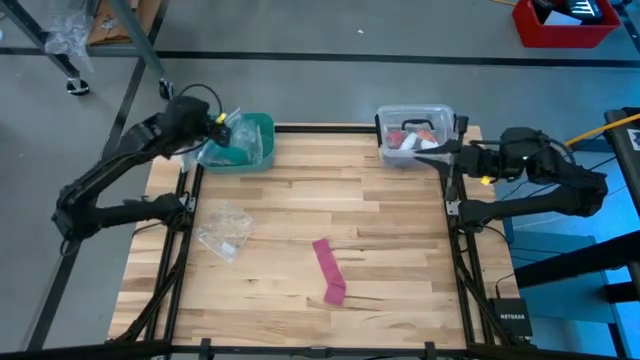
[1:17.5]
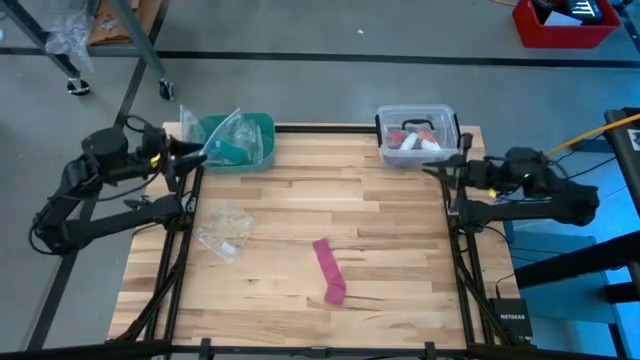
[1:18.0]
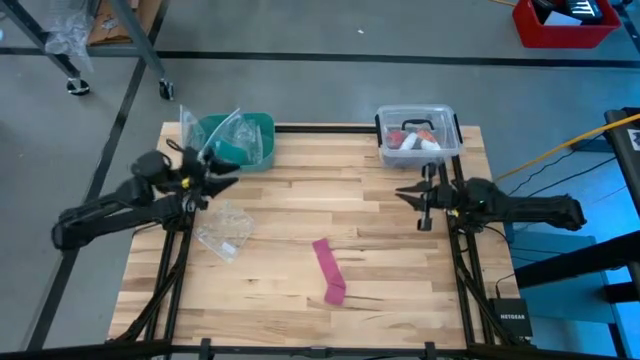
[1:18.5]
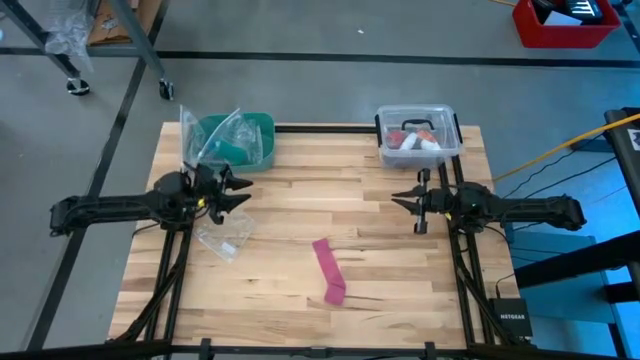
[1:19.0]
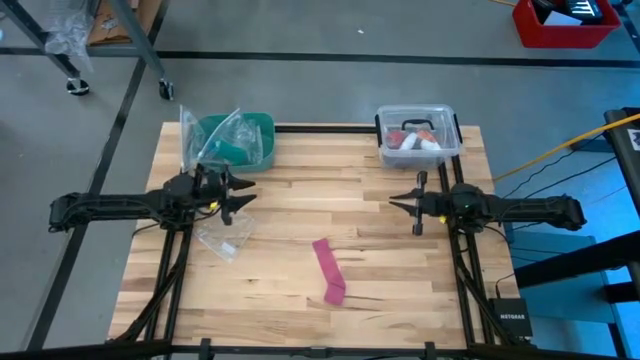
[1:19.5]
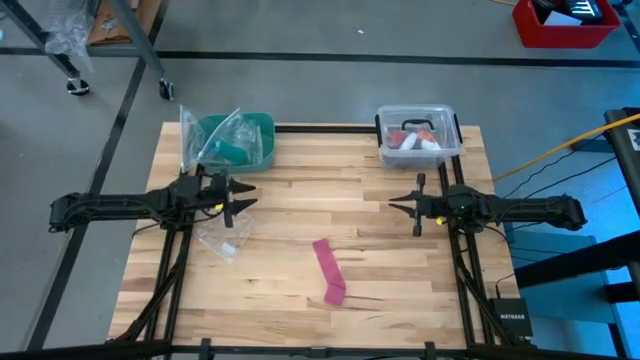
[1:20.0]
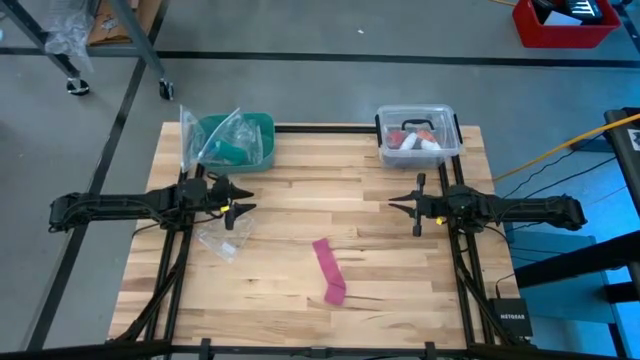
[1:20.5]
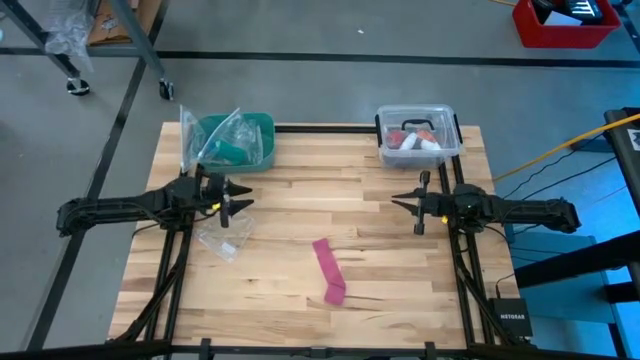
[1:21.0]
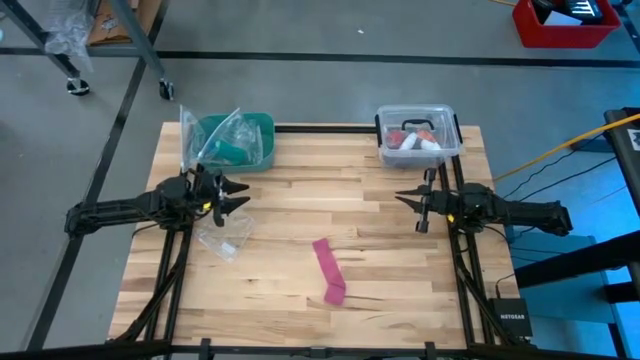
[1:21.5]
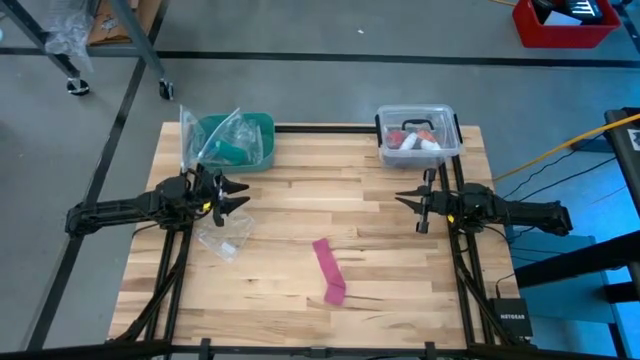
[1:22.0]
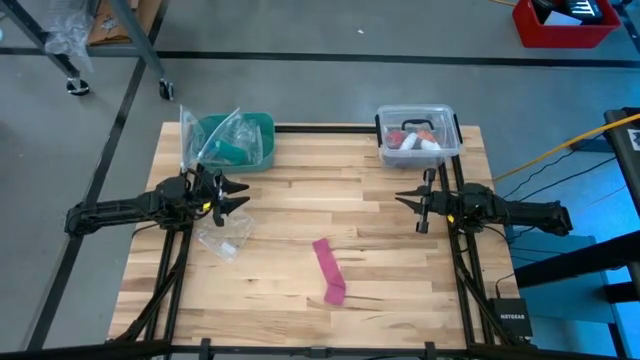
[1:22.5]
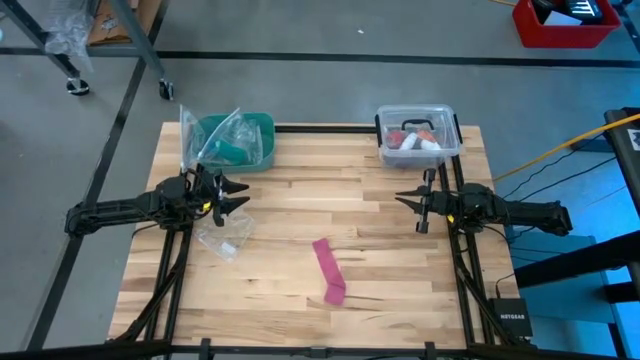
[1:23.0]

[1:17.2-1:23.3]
Task: Roll bandage
Return to Home Position

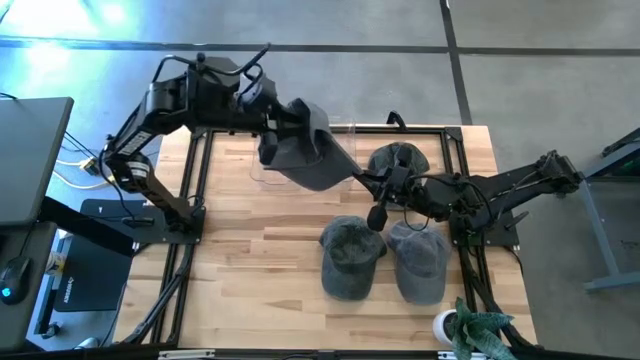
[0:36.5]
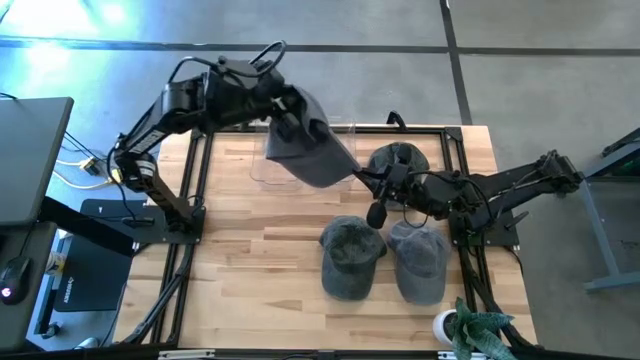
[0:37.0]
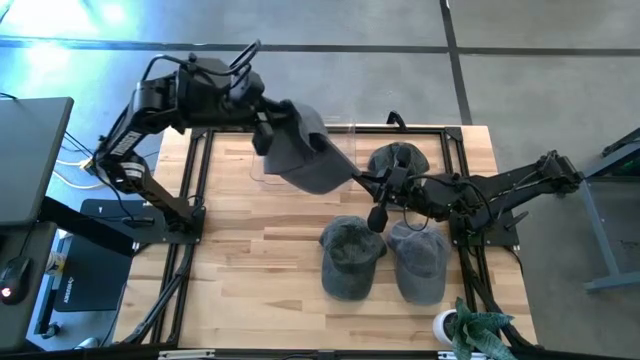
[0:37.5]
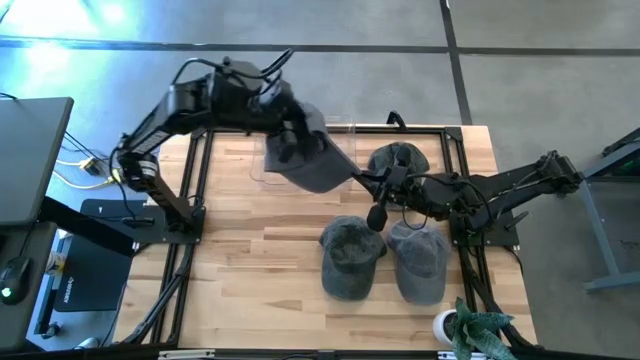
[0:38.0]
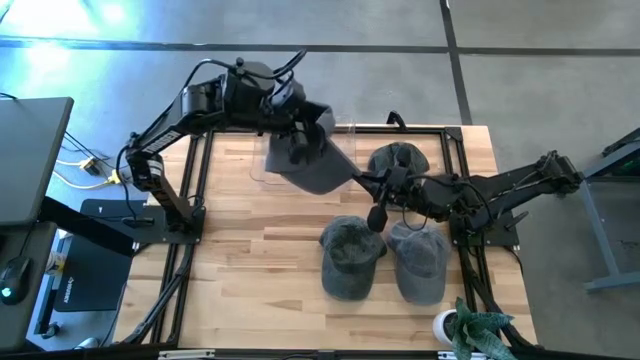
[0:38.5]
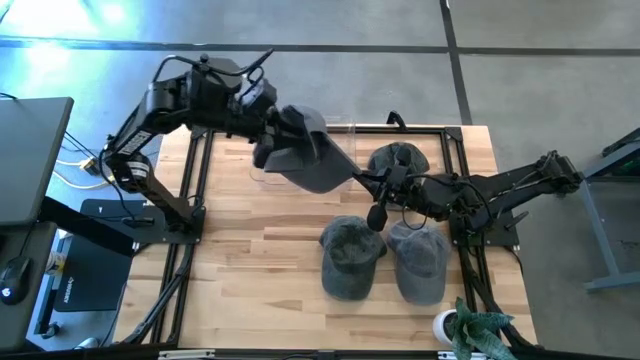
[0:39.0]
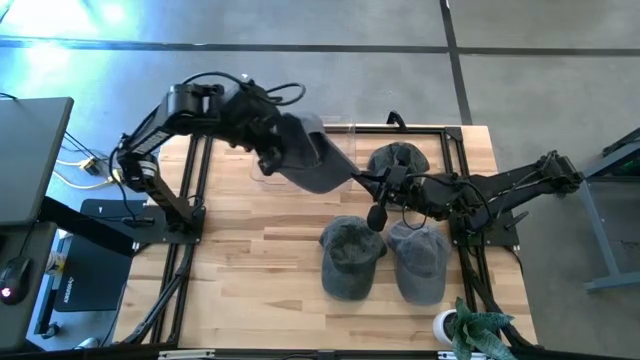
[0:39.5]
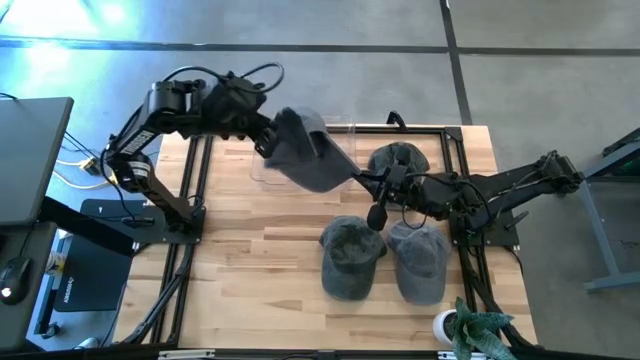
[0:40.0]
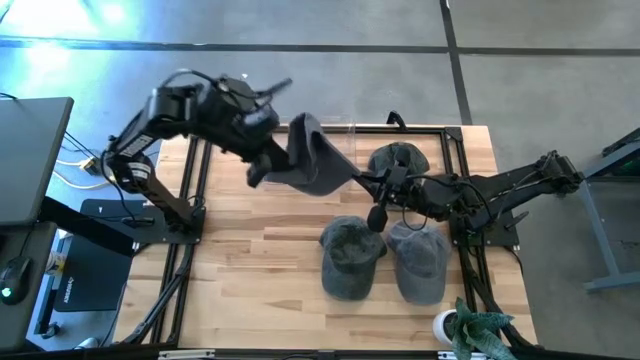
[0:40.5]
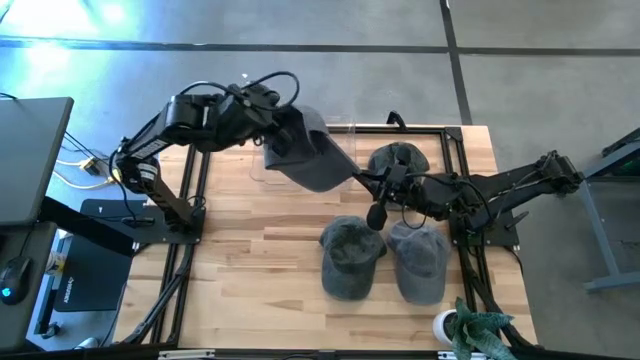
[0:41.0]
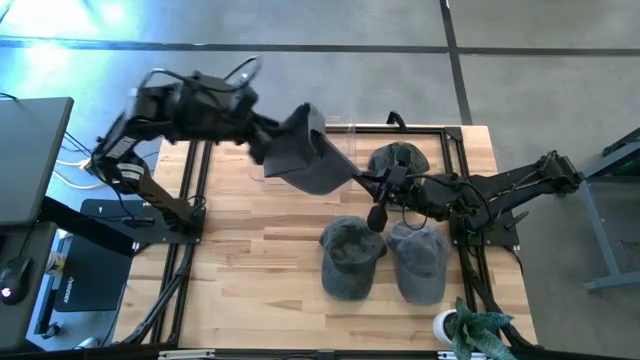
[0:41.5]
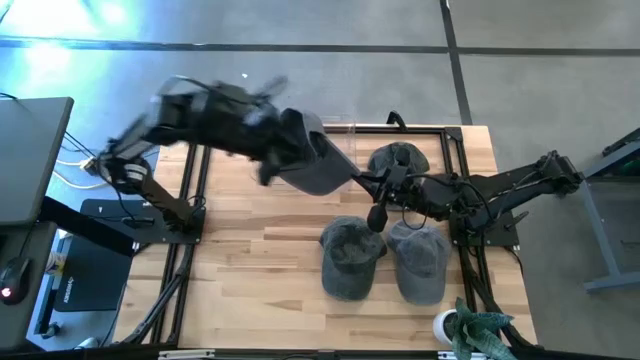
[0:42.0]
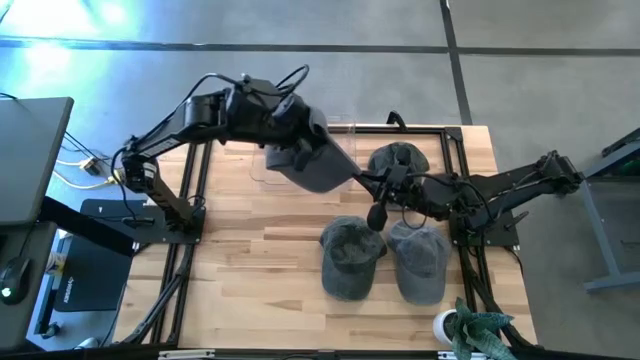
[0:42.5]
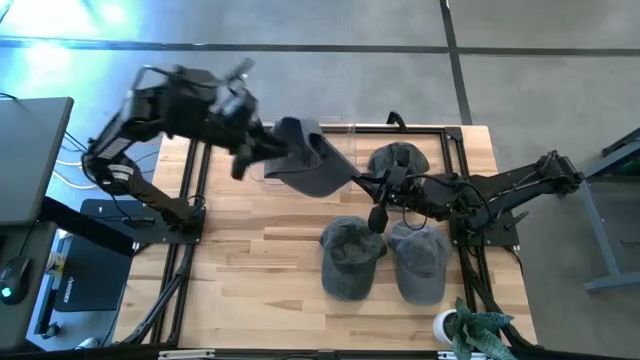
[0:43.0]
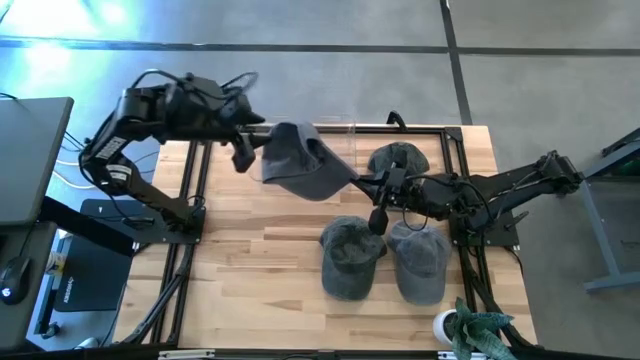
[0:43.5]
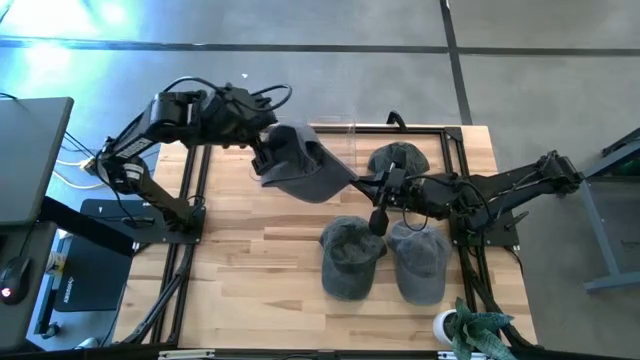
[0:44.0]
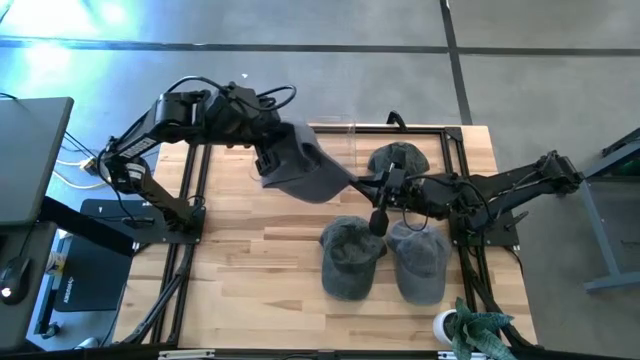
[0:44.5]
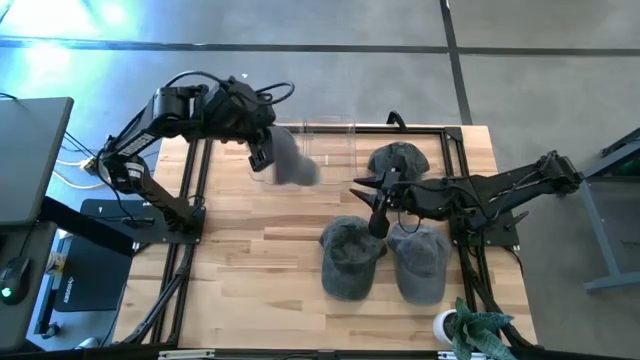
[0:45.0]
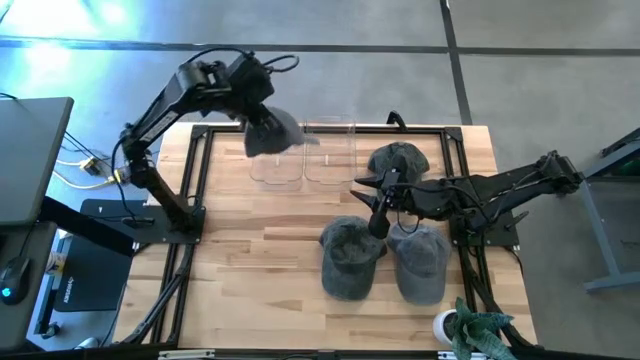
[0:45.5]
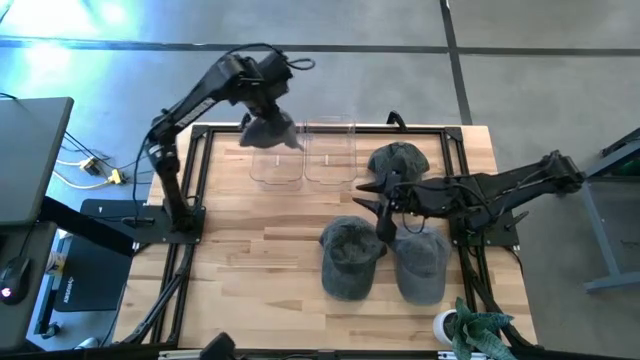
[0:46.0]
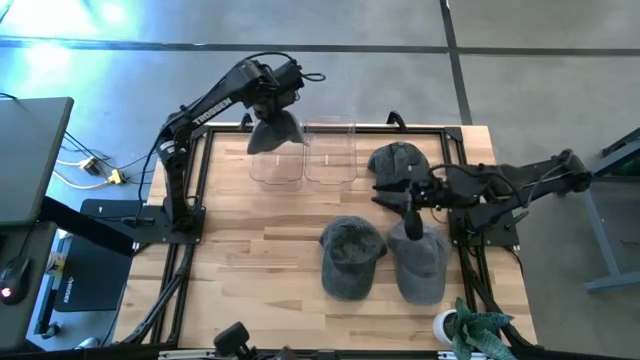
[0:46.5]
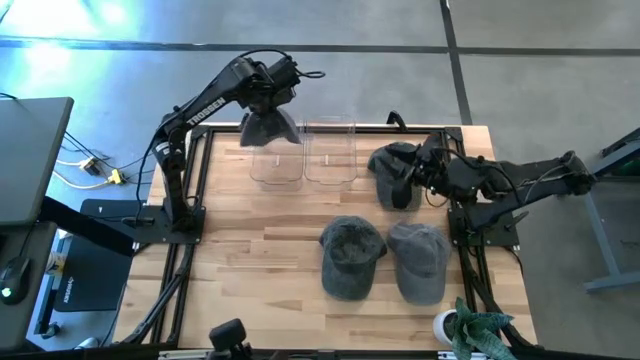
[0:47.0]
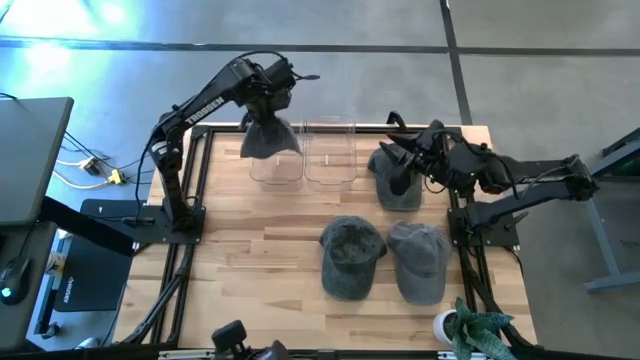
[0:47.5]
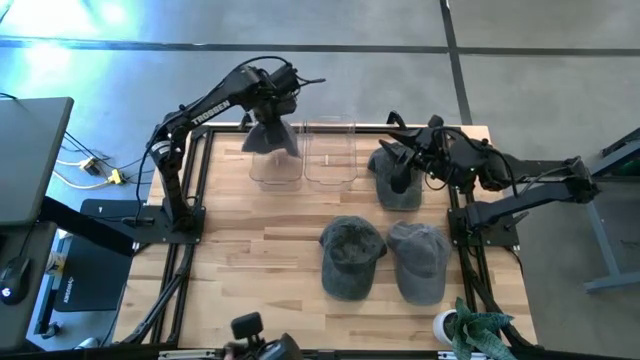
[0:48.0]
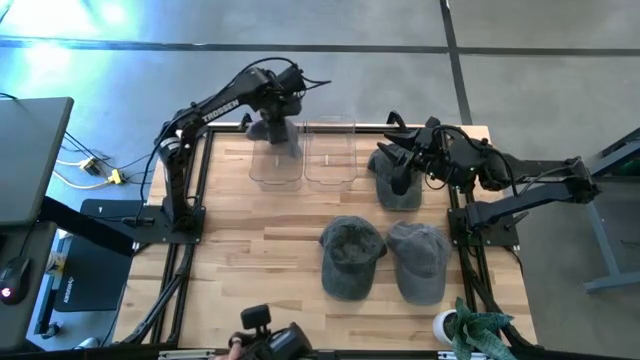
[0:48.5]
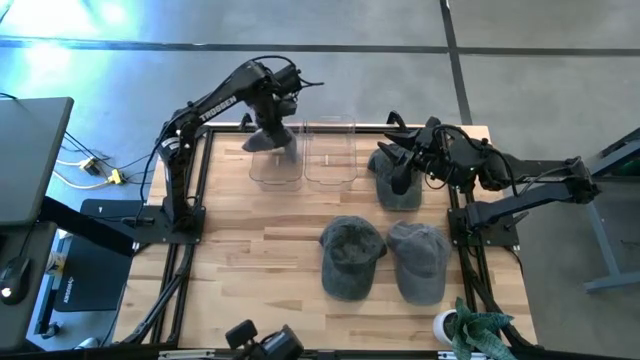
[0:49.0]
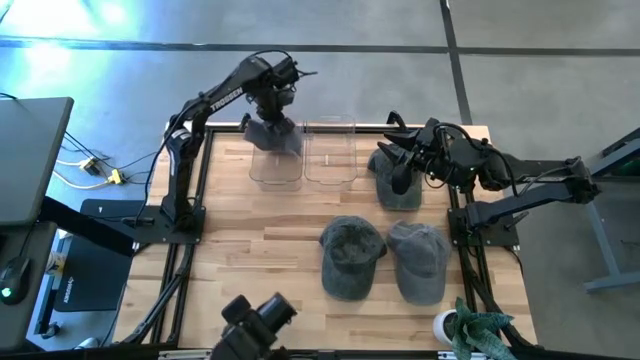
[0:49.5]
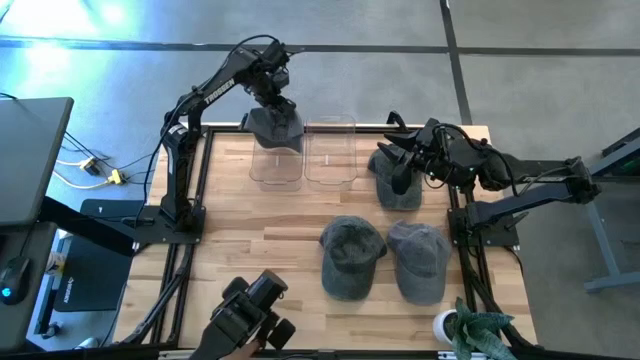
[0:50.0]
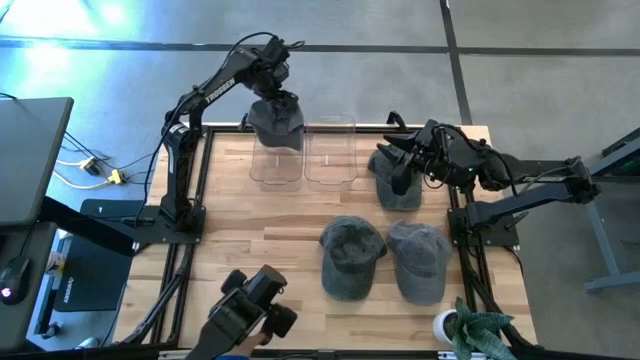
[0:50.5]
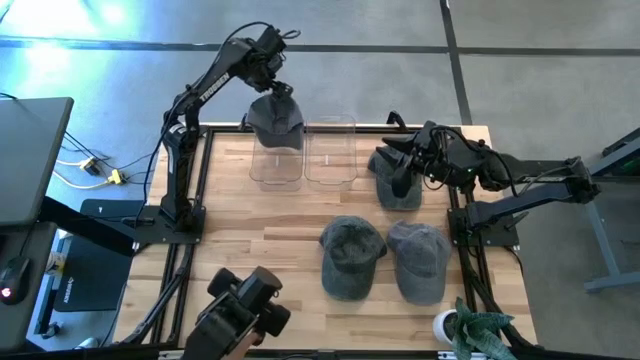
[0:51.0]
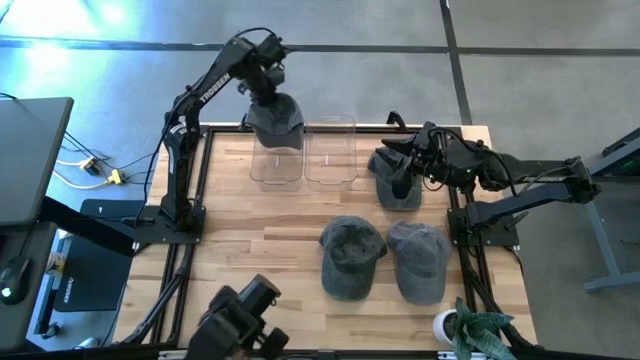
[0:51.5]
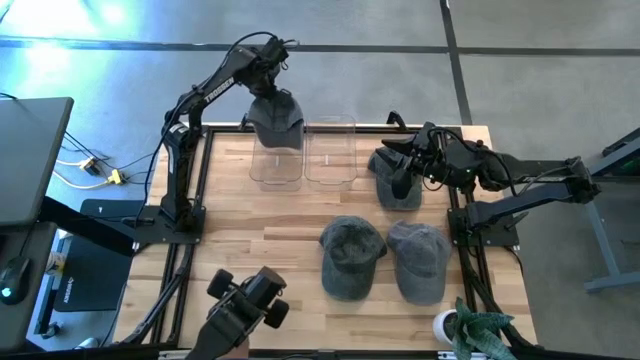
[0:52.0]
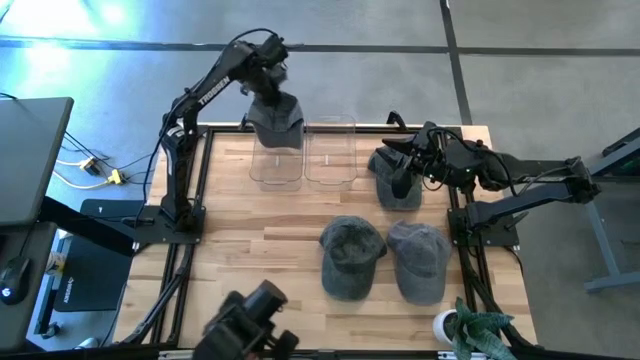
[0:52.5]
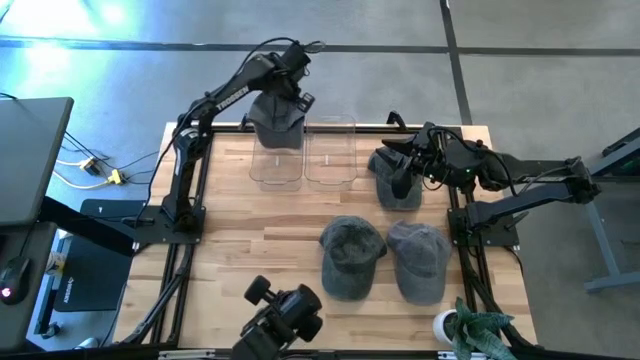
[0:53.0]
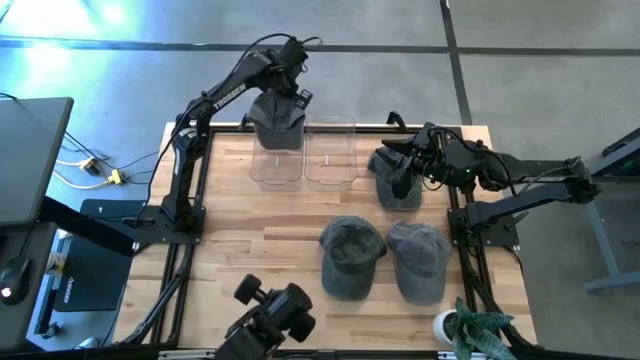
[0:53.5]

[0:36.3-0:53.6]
Task: Pick & Place hat
Put the left gray cap into the left transparent bin
